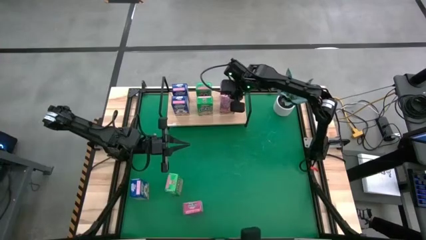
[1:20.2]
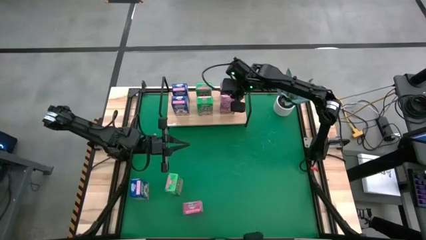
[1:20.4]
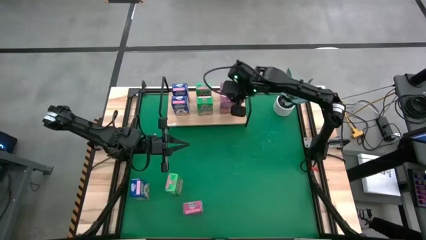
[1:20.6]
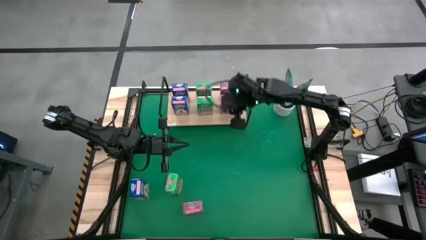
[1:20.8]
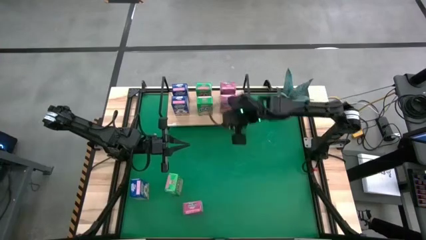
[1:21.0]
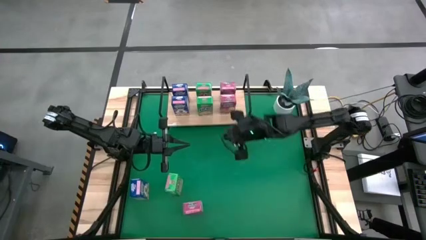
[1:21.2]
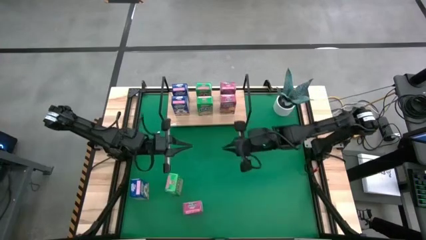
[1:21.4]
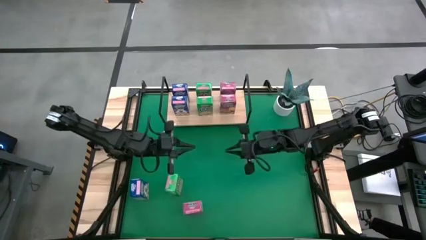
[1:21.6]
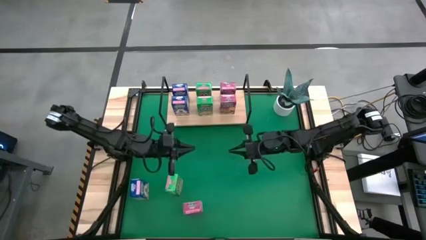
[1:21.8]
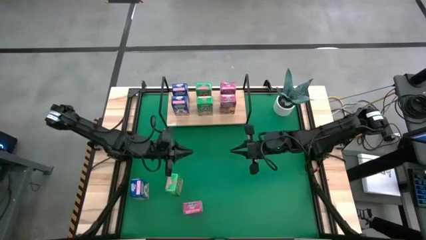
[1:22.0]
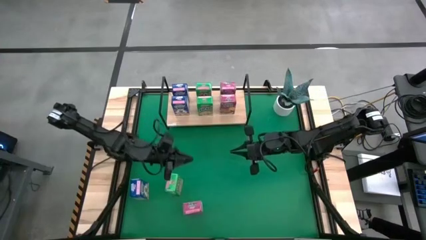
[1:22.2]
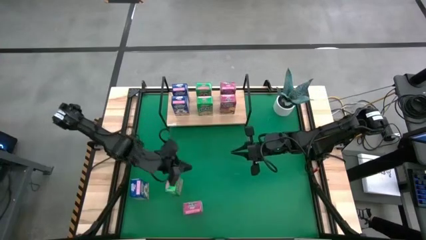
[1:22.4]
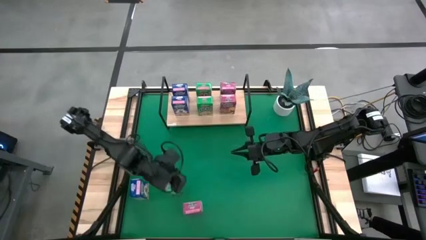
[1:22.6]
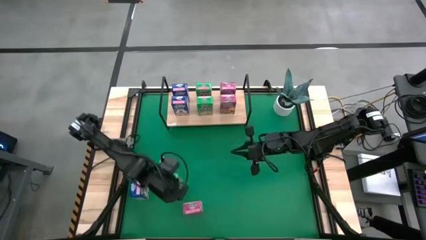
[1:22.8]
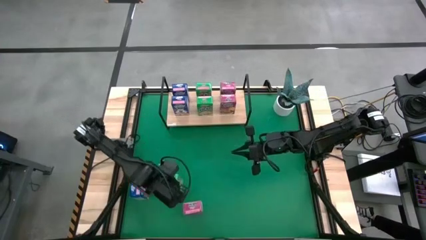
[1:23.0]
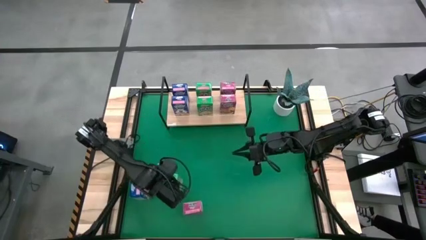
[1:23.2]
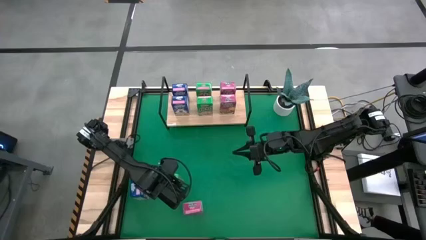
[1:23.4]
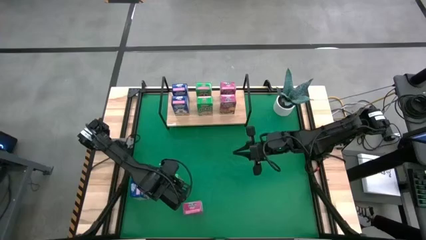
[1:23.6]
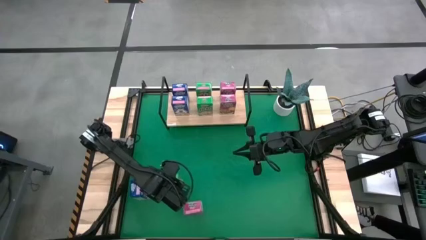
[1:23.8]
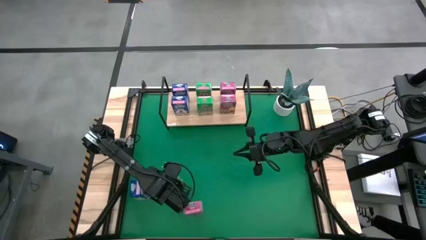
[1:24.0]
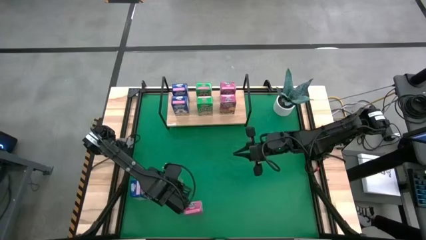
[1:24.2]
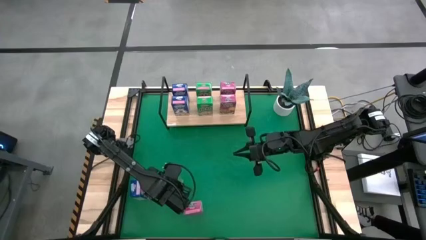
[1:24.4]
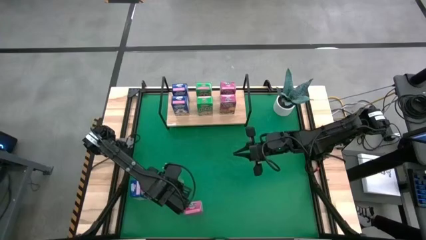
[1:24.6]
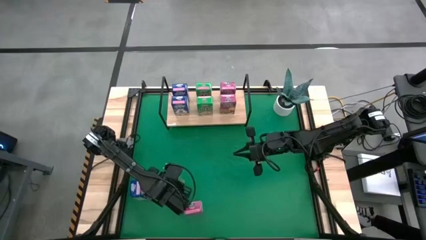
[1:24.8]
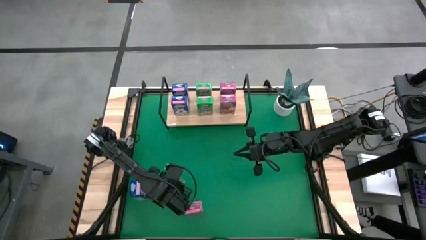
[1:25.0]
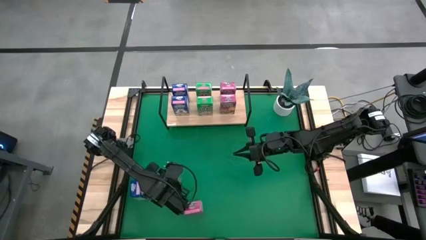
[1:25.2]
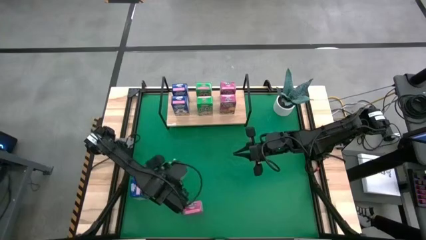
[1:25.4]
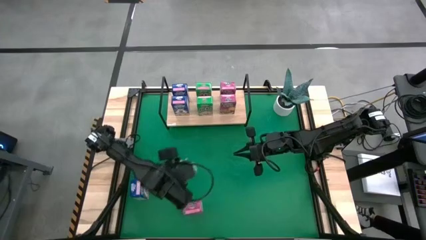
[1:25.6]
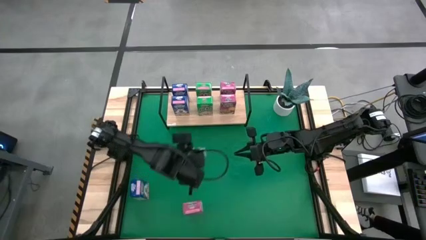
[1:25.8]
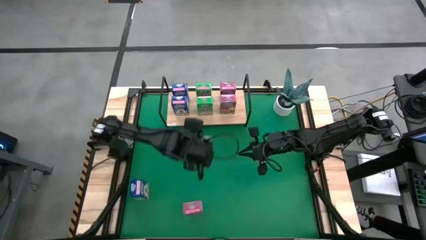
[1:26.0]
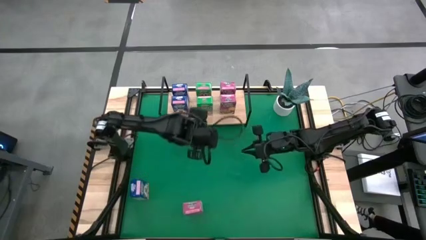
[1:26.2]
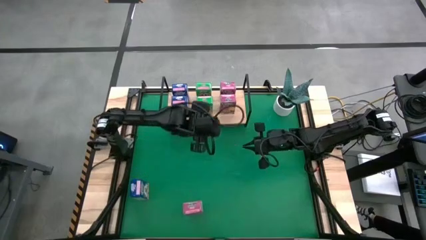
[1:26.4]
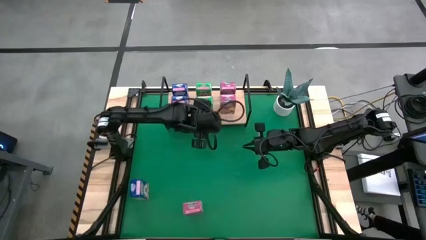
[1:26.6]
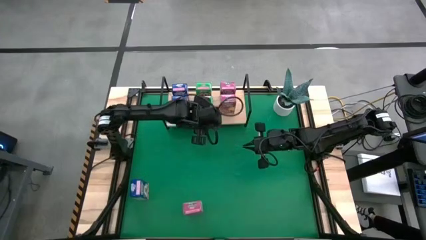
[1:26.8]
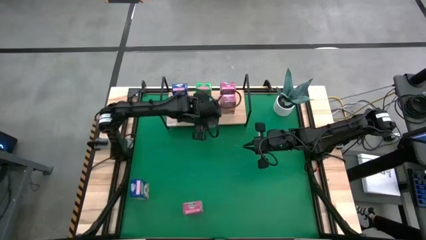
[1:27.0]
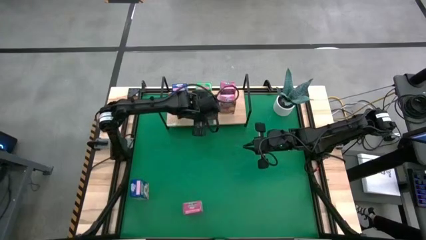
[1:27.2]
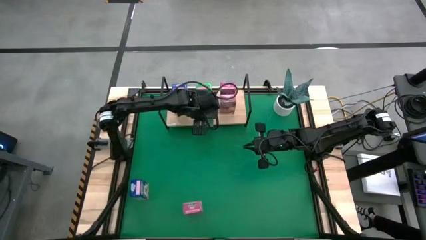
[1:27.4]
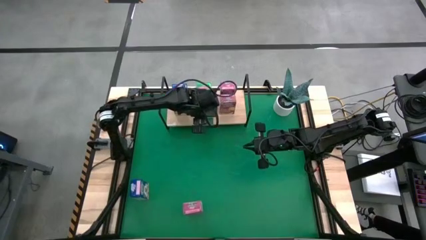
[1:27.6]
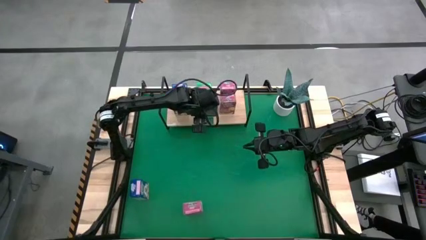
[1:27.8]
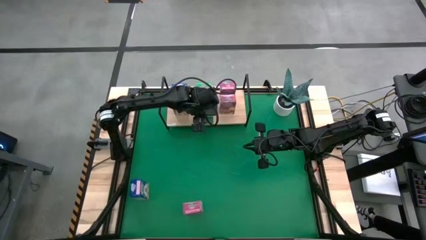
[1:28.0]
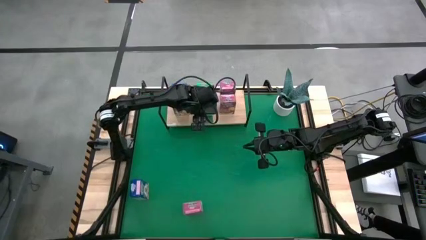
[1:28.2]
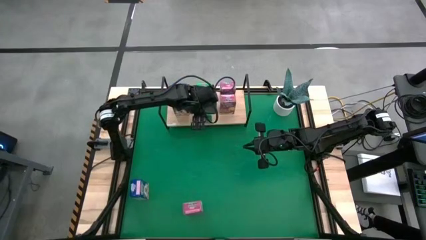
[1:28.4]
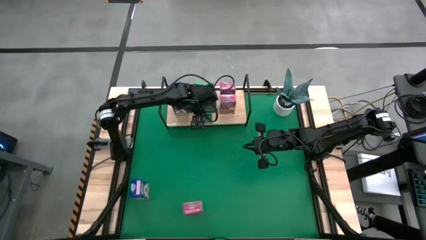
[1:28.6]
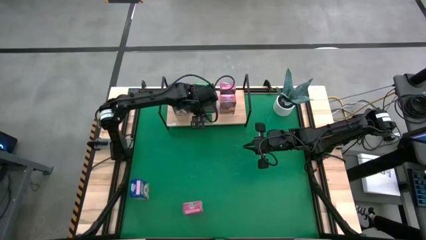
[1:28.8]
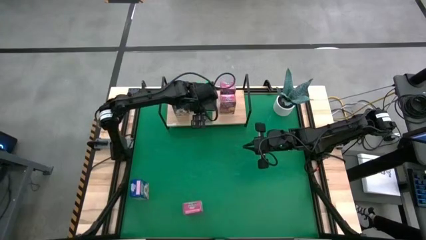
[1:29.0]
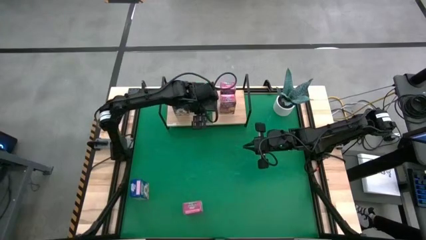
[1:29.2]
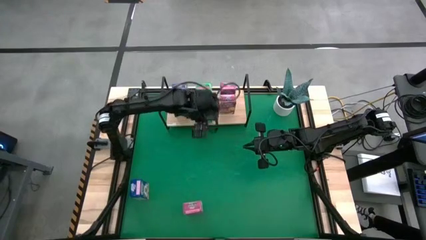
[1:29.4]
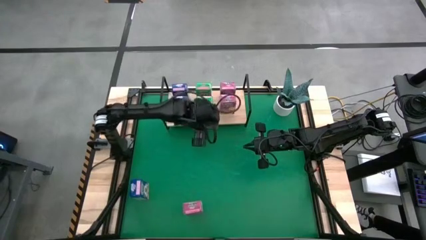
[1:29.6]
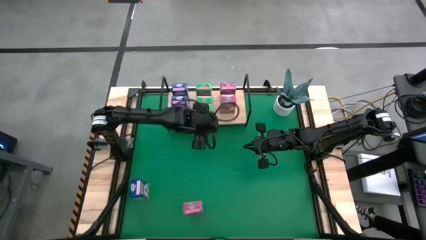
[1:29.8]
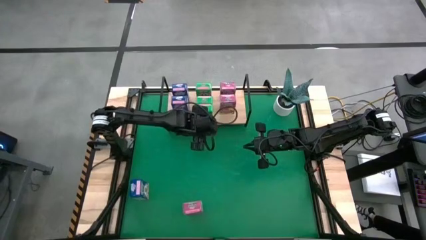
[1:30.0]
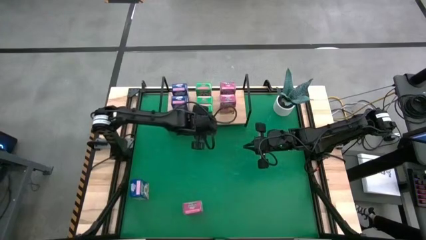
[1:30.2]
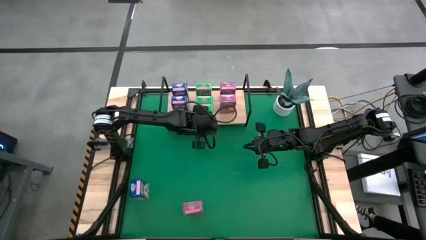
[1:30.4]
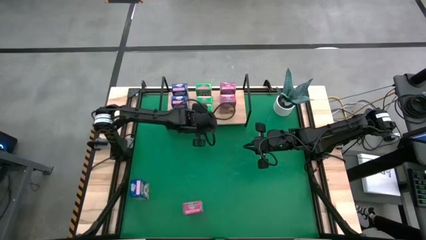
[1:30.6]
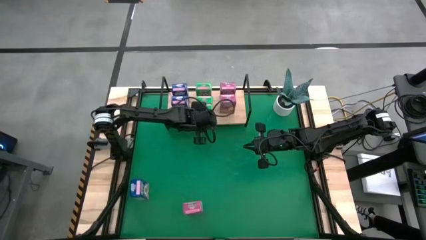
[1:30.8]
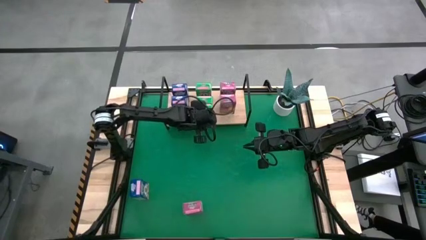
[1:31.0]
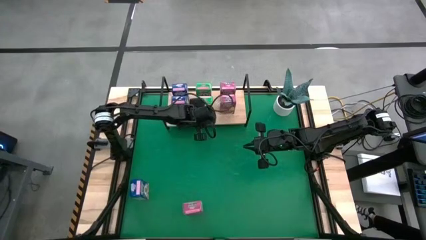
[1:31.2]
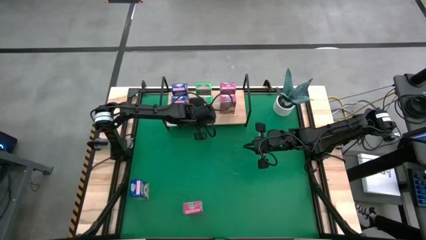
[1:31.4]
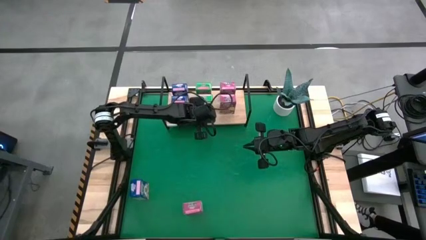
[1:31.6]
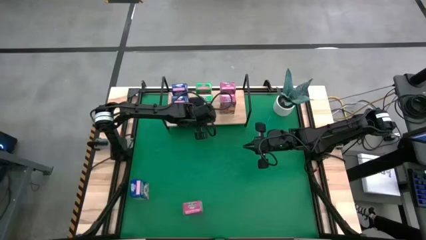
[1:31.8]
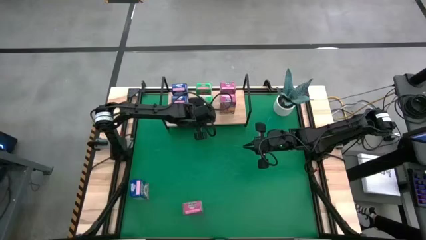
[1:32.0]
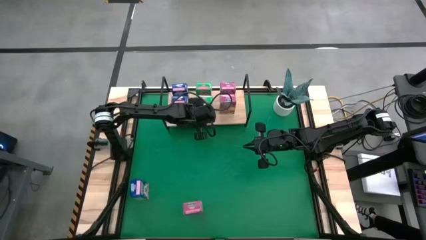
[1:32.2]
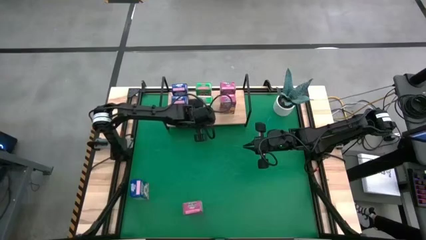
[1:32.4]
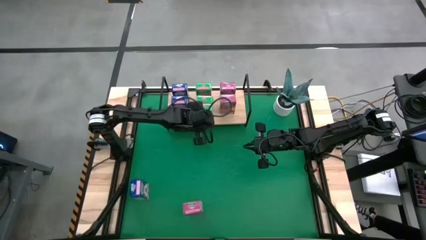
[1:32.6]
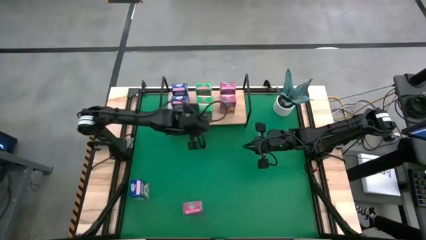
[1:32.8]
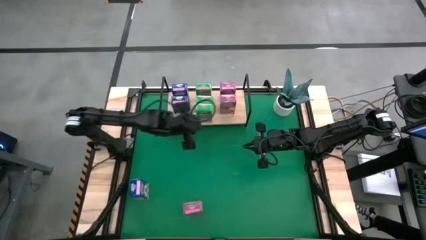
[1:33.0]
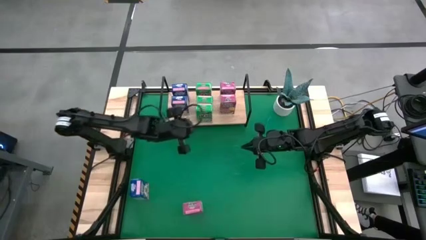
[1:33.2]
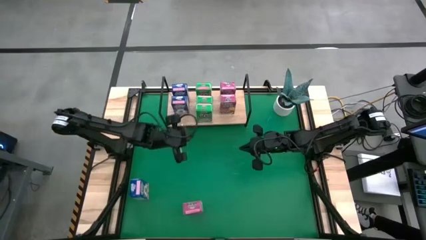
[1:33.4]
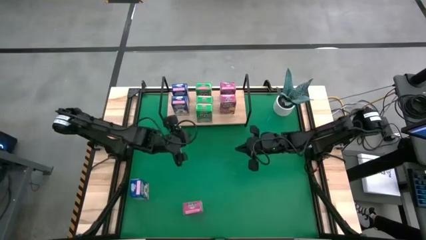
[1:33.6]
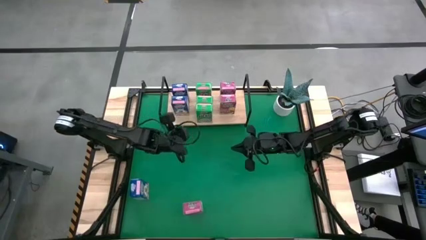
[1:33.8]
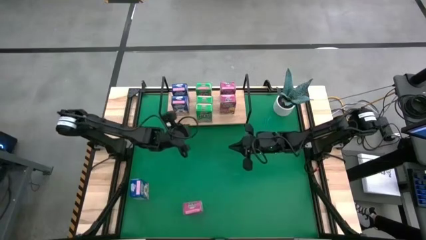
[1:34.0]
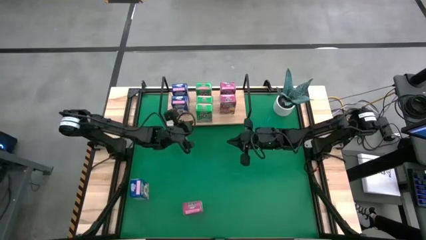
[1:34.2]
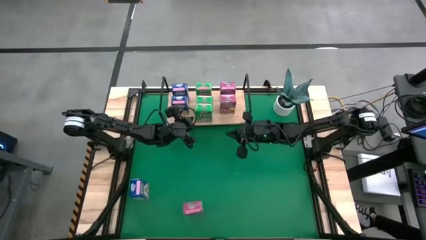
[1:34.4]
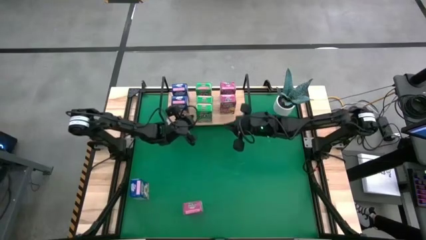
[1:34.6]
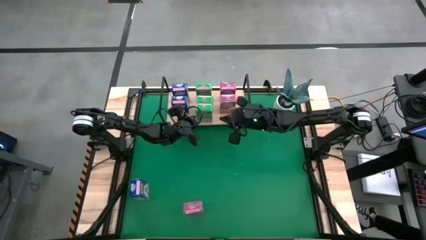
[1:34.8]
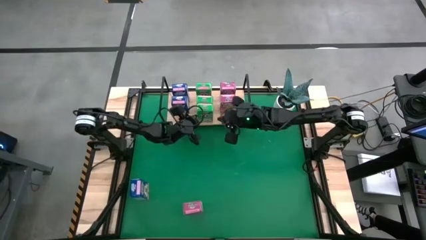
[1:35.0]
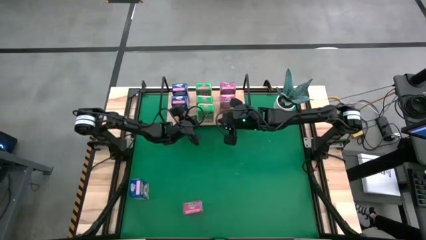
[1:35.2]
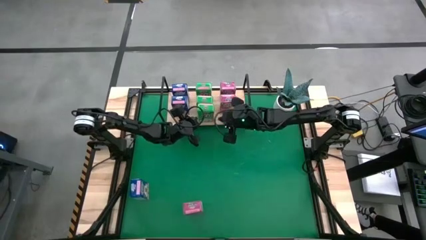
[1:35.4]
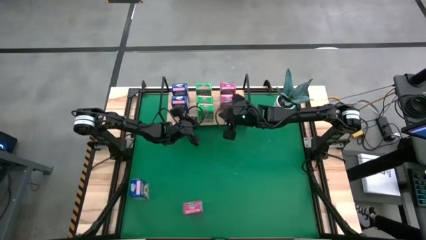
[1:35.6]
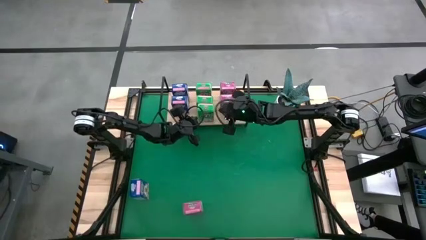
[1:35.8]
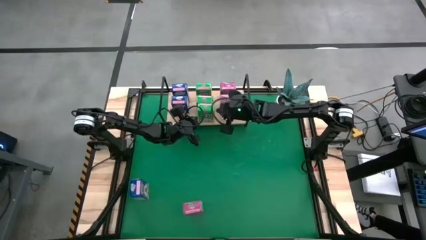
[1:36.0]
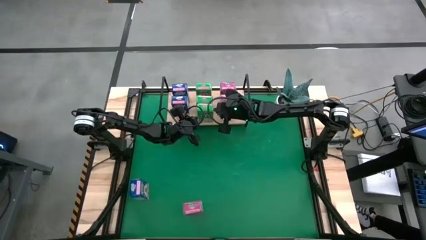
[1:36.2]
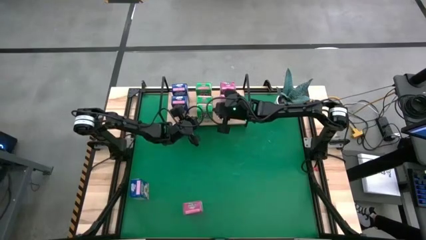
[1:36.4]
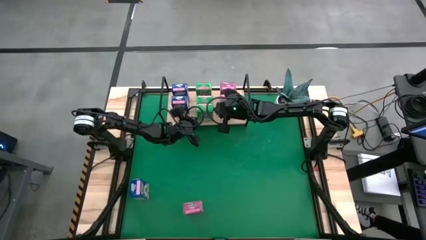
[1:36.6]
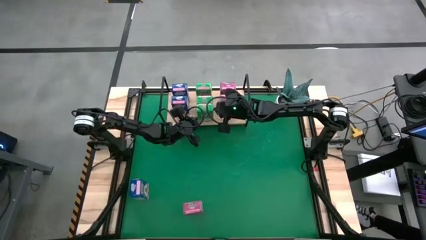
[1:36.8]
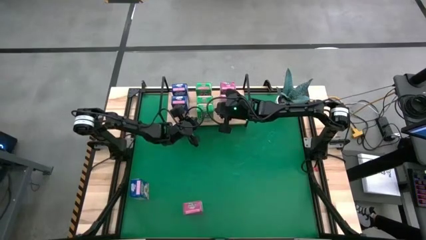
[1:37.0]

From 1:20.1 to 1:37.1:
Task: Stack cereal on shelf
Put the green cereal box aligned with the other green cereal boxes on the shelf
